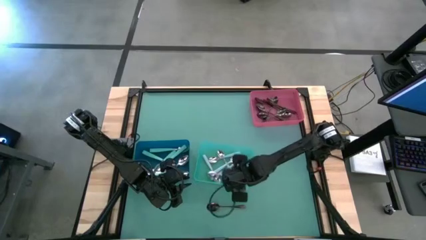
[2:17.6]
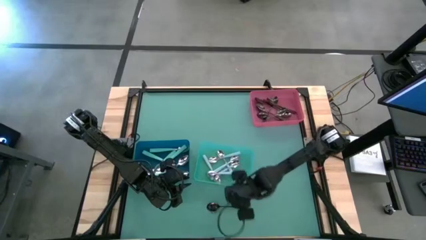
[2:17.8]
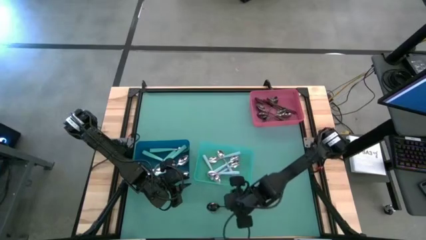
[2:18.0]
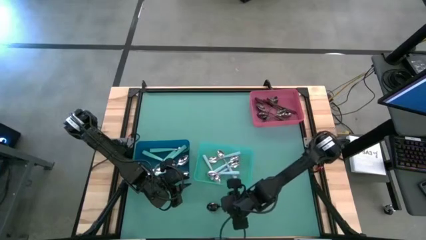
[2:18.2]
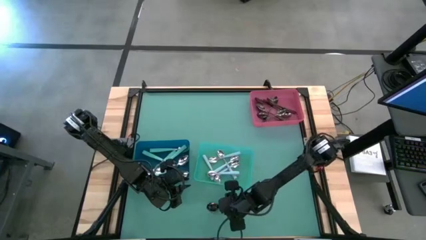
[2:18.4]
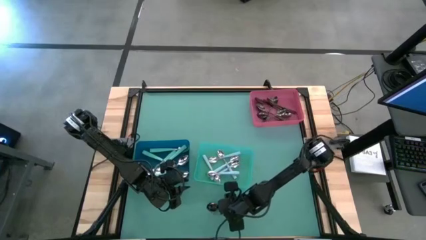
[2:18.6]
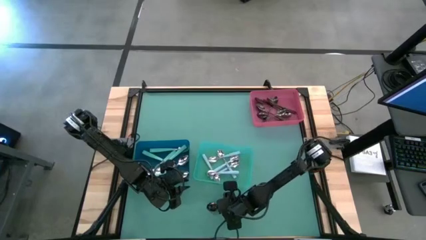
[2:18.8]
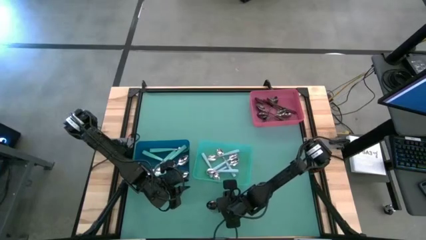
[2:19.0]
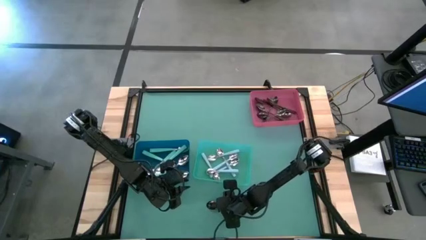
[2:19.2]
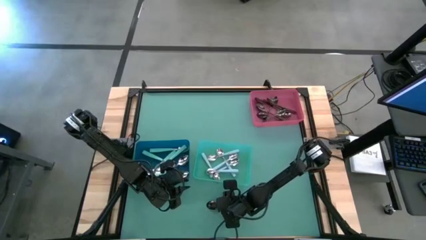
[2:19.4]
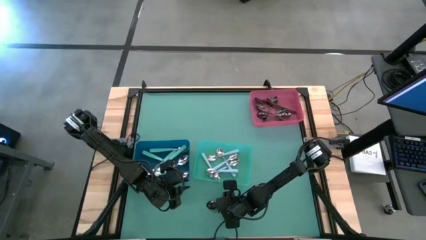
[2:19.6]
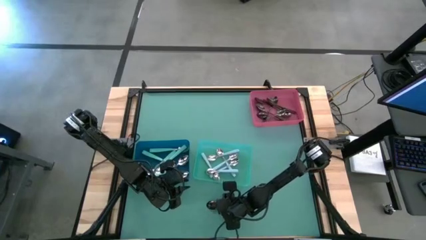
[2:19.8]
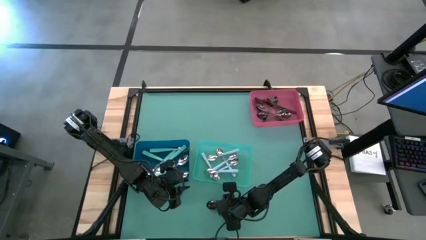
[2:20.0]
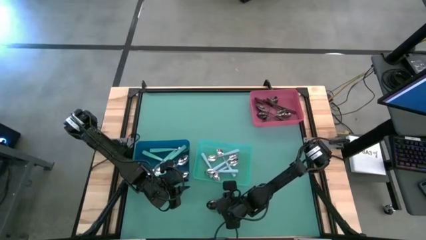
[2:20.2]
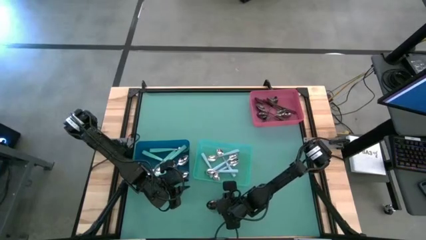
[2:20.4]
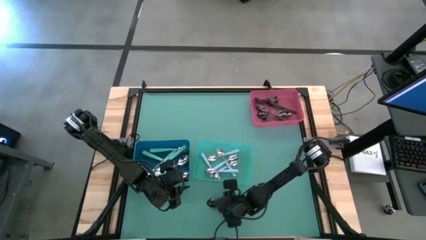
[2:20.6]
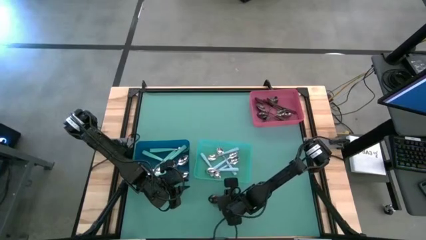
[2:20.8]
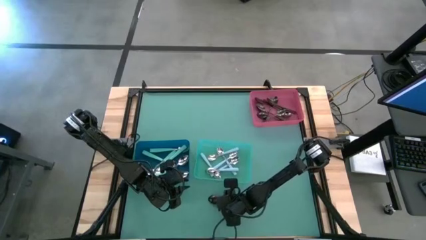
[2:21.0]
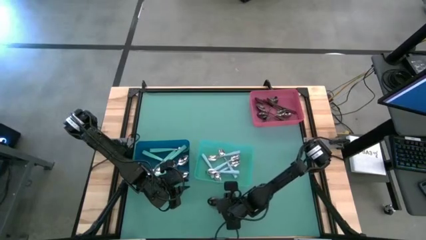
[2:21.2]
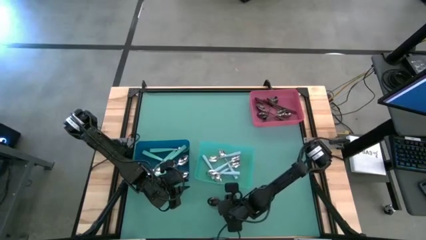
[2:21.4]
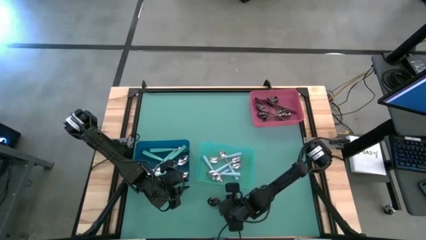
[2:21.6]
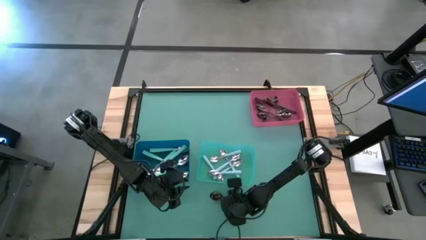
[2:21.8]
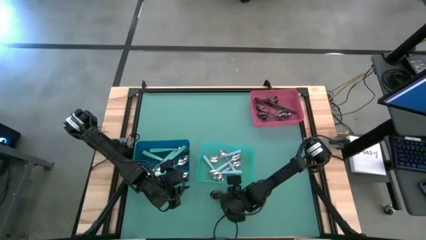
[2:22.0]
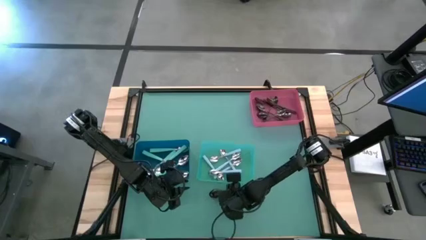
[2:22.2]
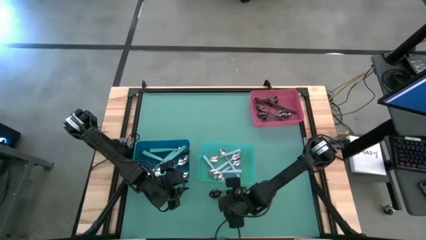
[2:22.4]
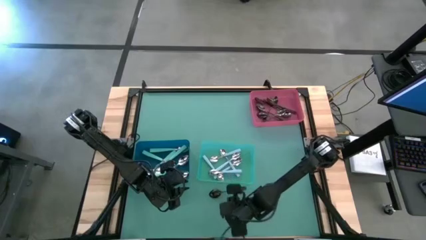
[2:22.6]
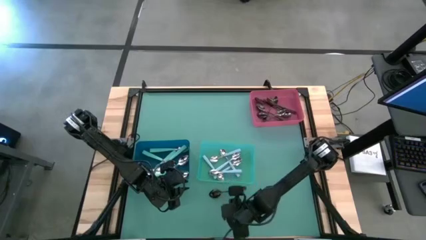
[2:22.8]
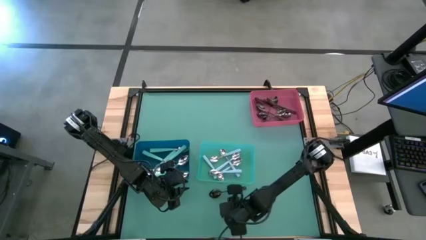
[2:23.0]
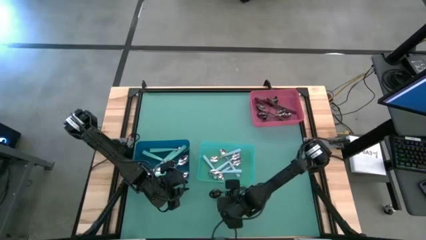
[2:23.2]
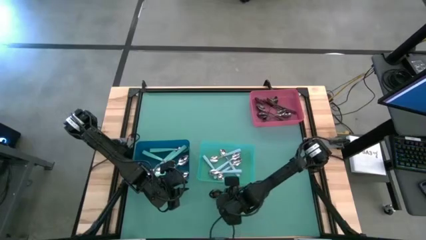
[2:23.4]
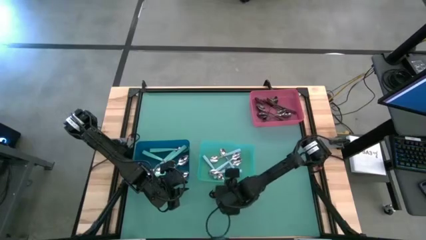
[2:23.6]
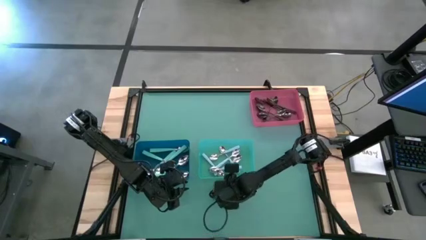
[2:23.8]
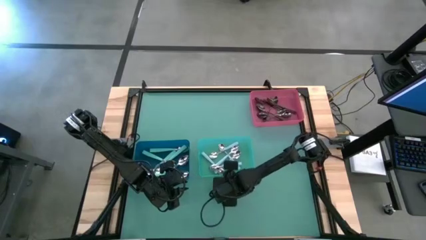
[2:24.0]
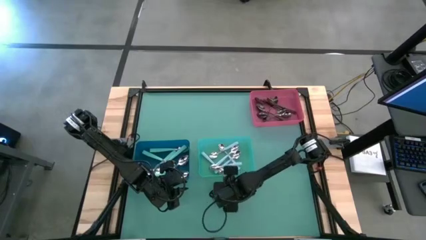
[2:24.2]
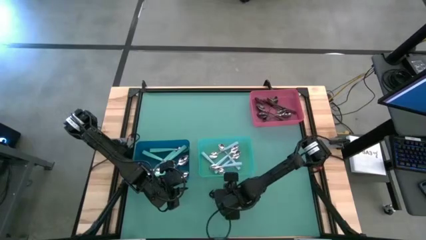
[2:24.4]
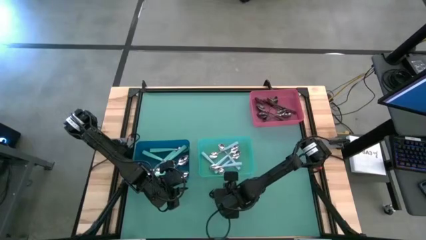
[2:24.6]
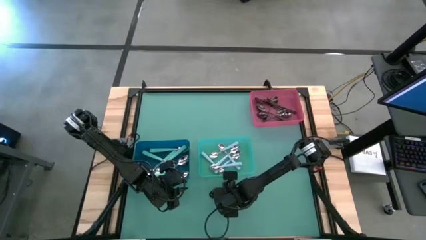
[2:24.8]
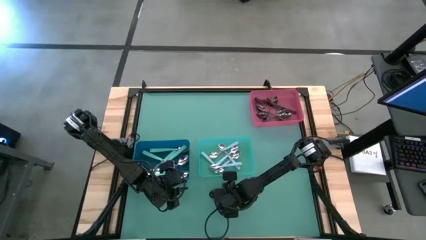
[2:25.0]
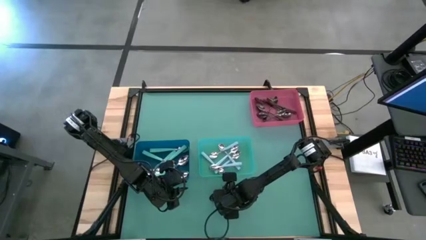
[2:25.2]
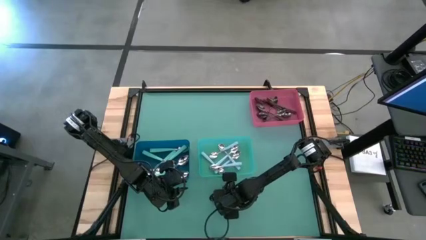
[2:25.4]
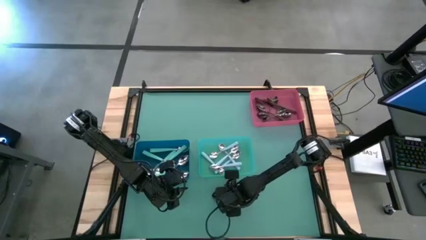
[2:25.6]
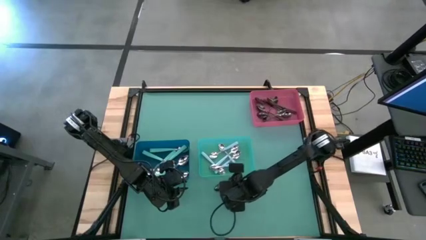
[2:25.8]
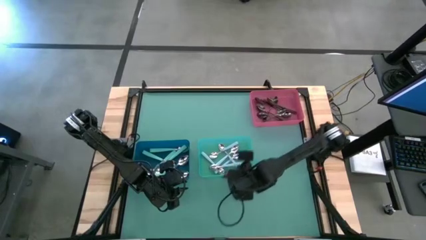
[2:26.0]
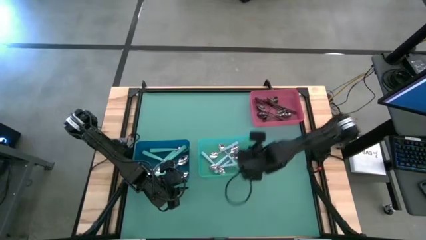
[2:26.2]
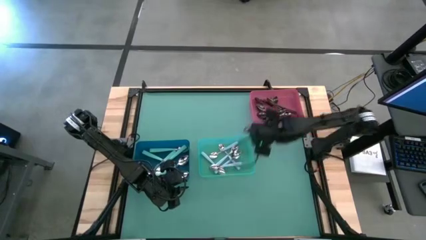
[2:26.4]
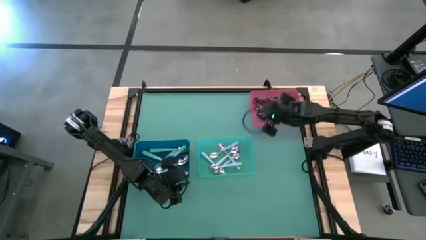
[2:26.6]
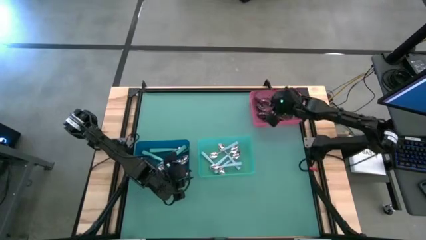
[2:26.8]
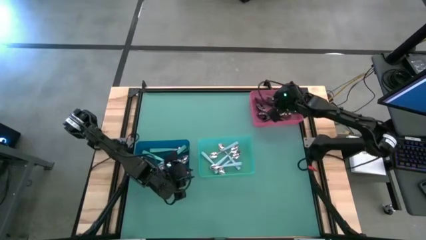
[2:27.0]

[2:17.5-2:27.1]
Task: Sort silverware by color (type)
Put the black spoon into the pink bin

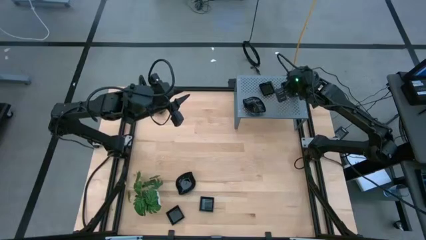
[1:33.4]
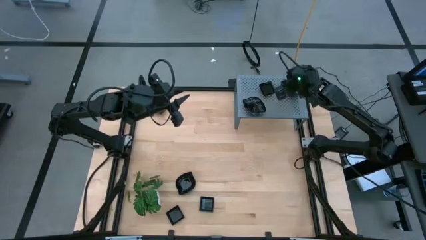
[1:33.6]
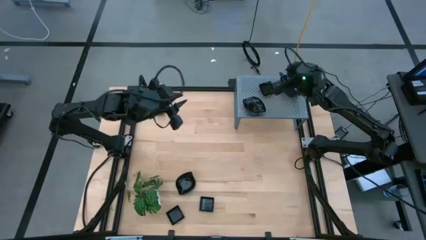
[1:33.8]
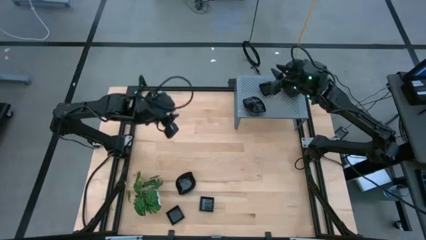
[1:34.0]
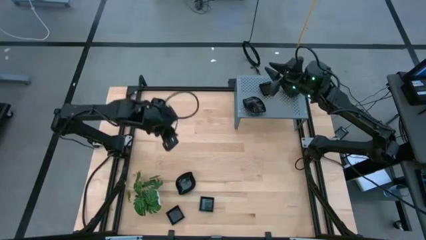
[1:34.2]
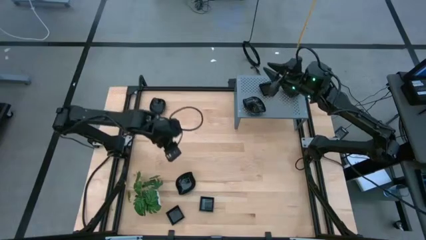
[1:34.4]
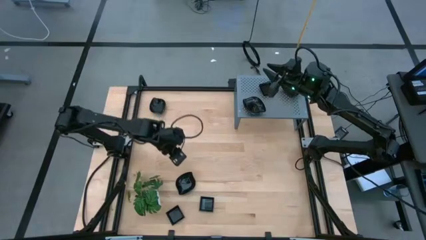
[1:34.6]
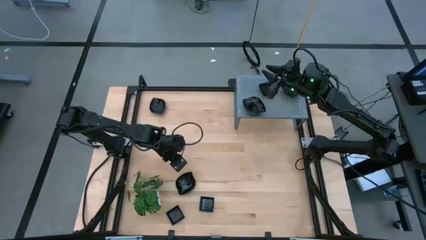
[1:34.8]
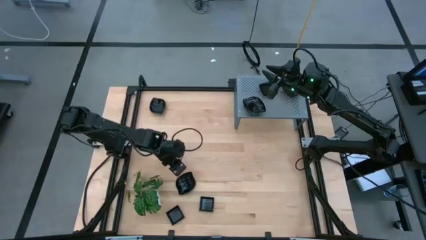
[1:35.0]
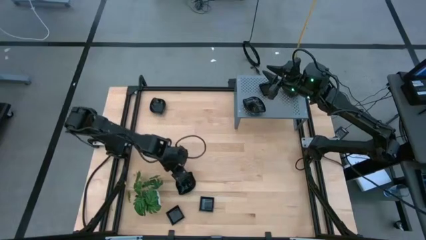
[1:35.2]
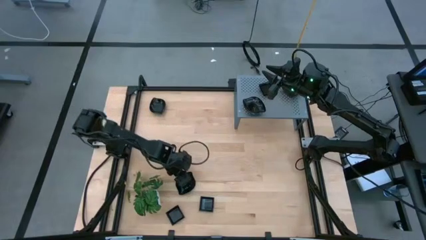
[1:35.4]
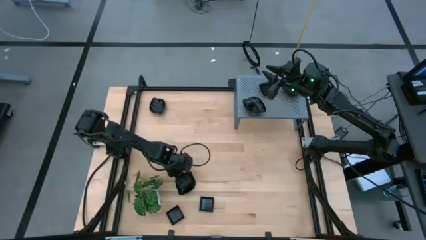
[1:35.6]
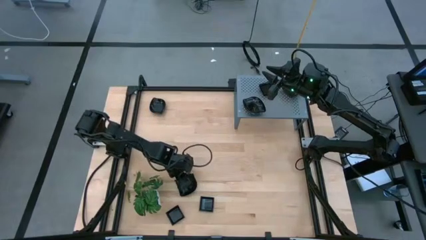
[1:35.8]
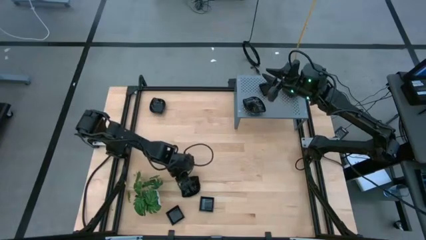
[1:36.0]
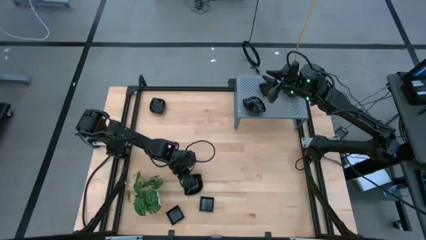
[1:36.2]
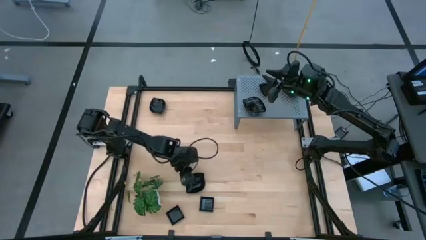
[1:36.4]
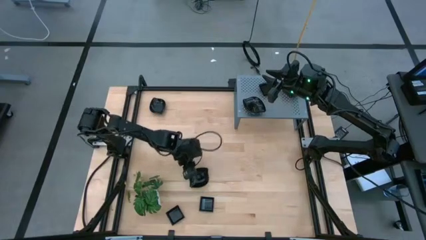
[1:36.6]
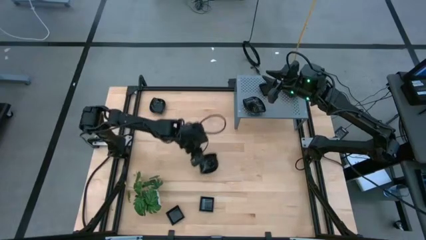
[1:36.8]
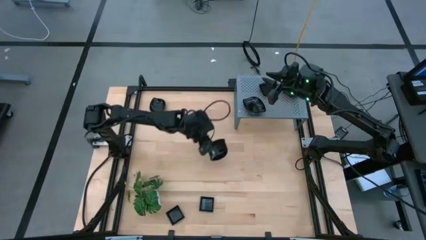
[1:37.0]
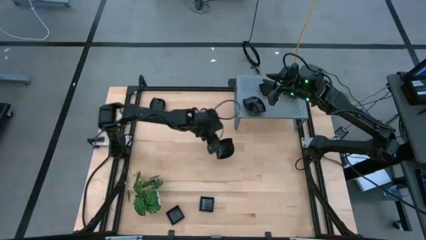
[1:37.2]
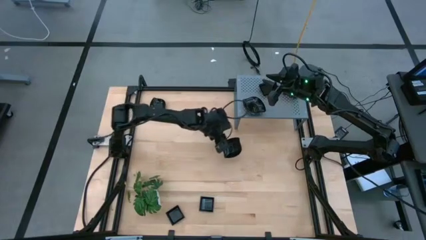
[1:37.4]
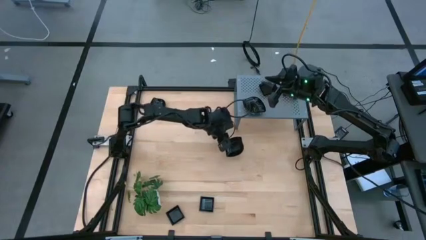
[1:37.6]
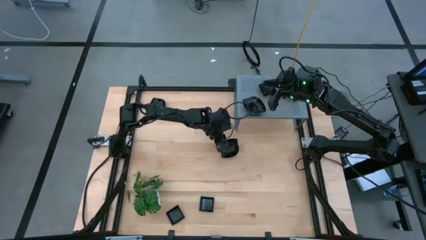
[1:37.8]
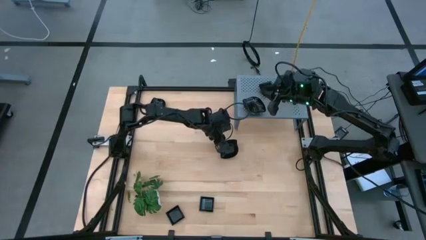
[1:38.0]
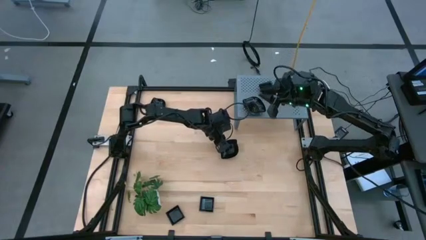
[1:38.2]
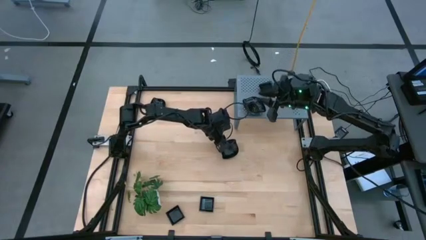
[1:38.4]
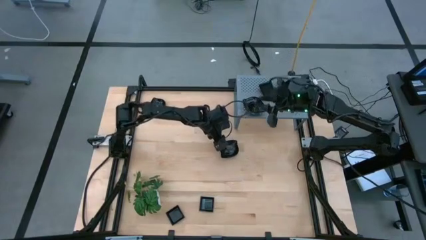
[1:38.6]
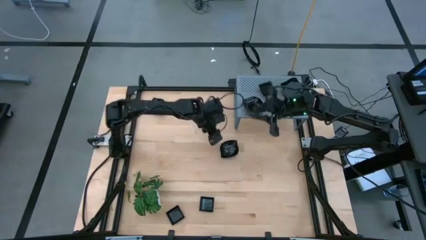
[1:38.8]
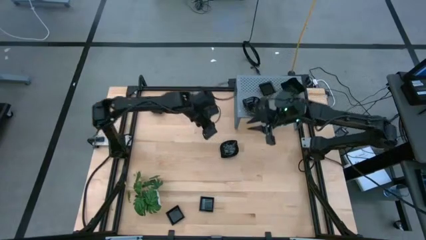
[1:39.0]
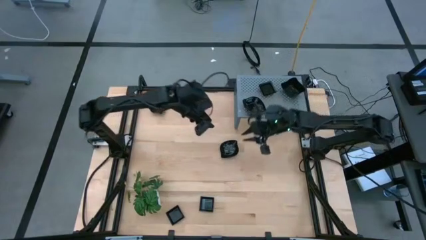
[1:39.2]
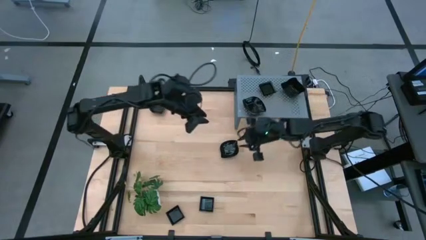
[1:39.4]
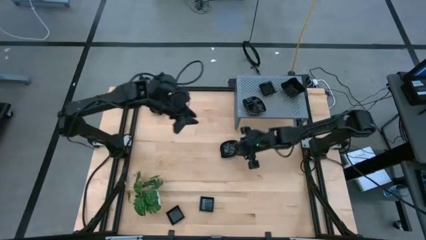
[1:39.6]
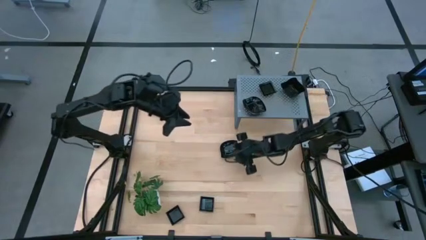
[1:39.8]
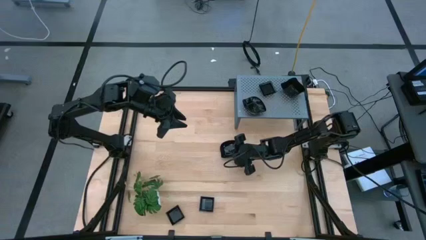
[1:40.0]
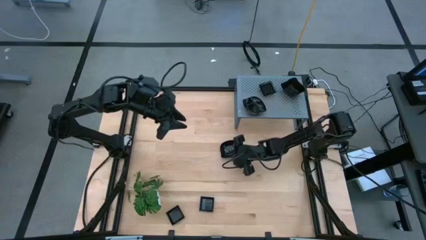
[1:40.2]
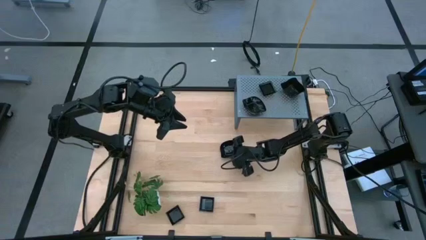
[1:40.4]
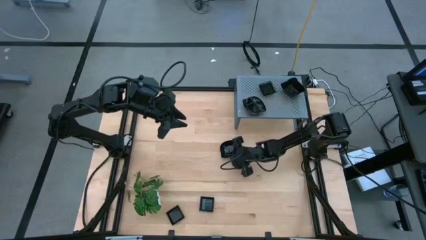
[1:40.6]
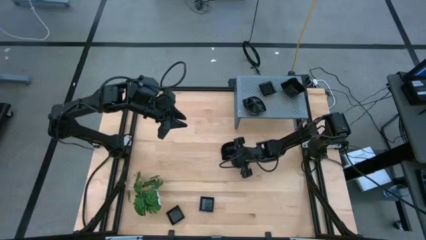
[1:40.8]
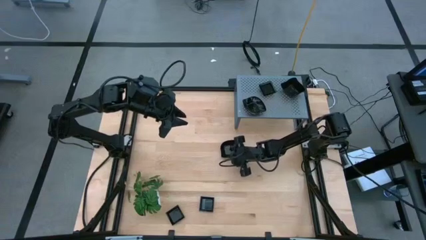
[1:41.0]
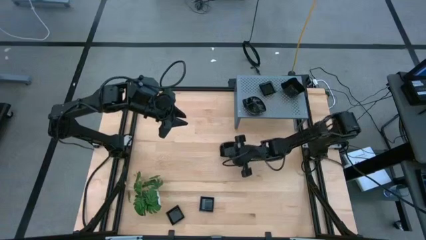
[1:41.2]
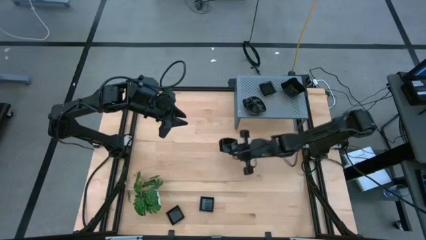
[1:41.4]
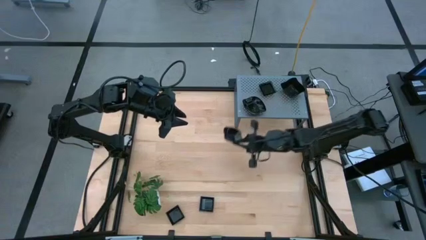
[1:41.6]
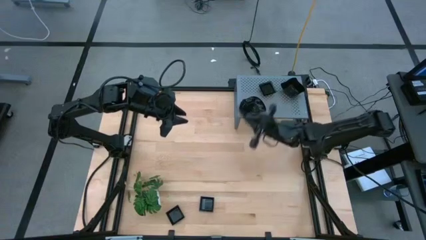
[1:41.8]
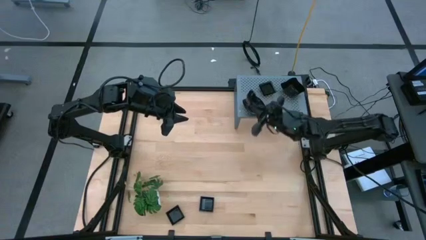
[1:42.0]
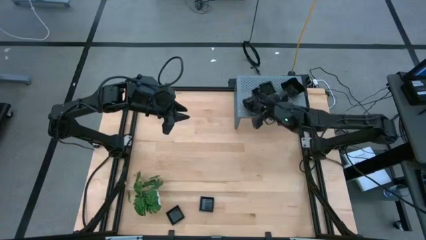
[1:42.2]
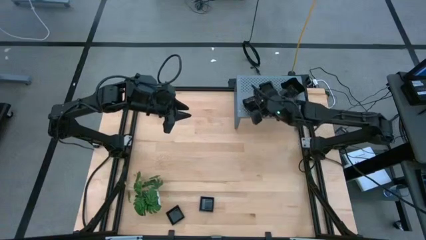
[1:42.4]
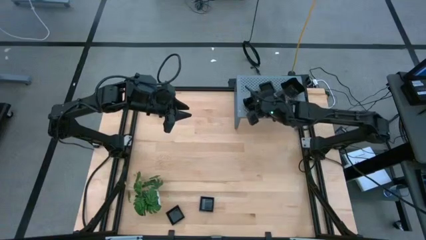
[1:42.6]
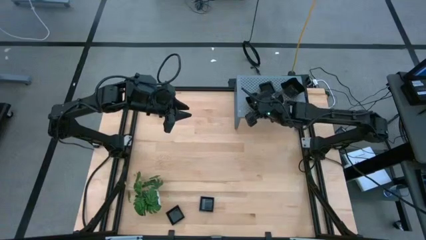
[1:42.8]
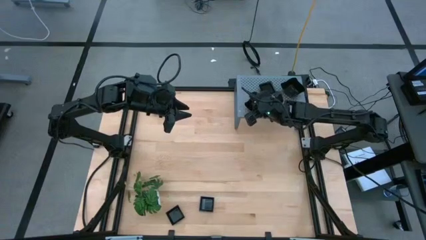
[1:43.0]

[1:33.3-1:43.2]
Task: Pick & Place Mini shaped plates
Stack the leaf-shaped plate on top of the other leaf-shaped plates
